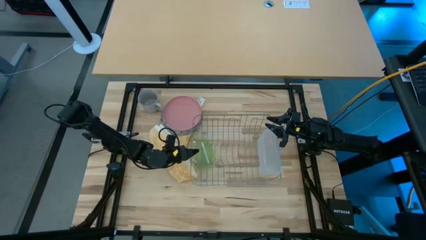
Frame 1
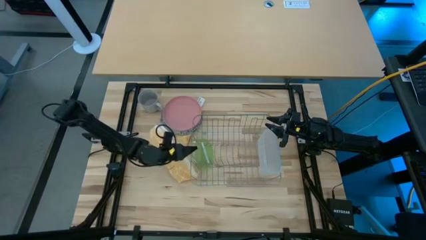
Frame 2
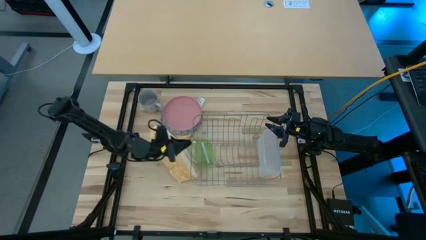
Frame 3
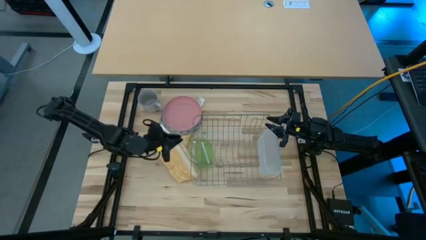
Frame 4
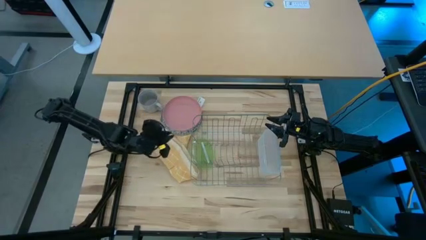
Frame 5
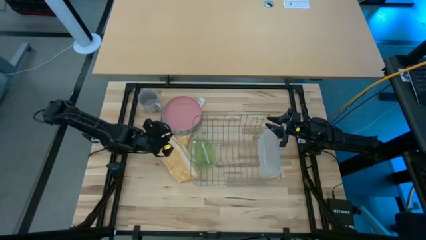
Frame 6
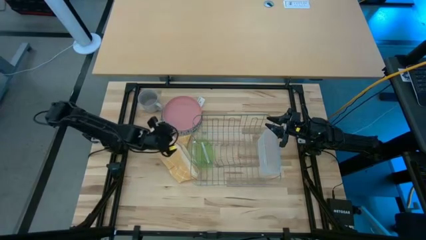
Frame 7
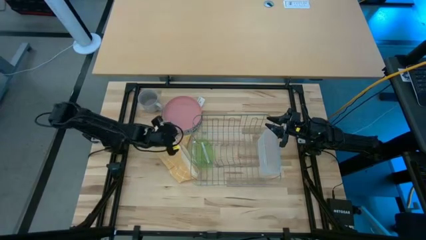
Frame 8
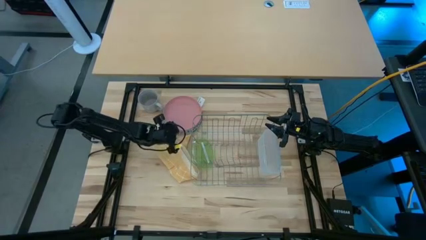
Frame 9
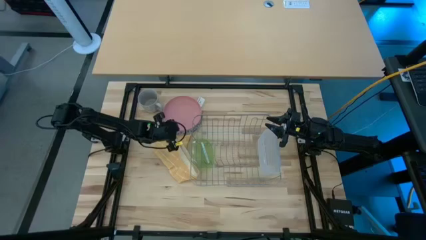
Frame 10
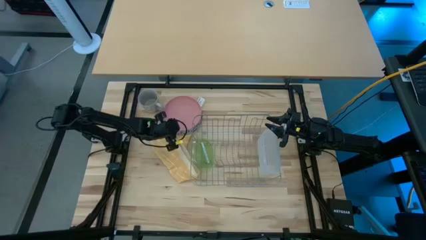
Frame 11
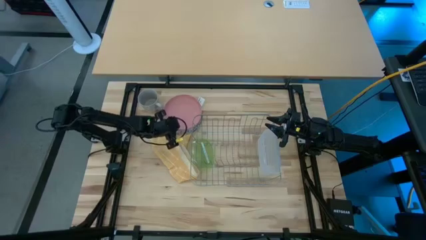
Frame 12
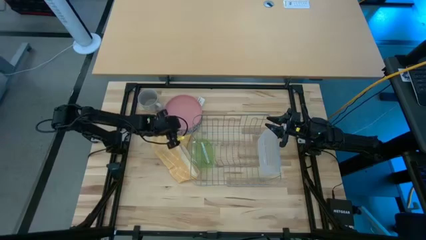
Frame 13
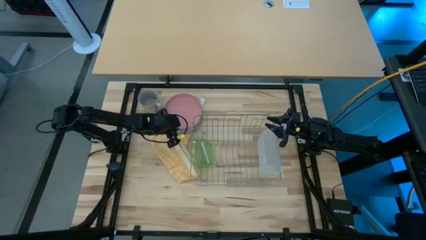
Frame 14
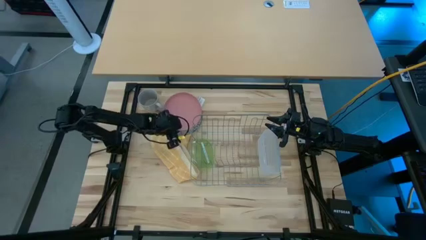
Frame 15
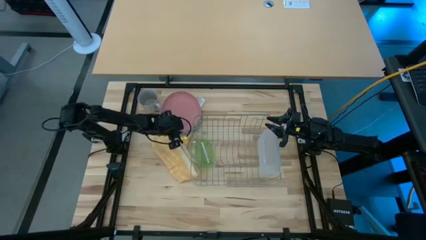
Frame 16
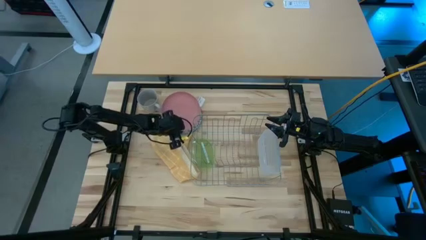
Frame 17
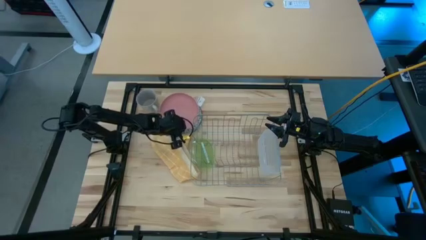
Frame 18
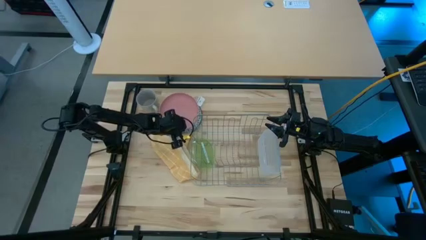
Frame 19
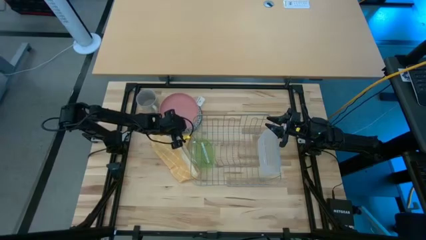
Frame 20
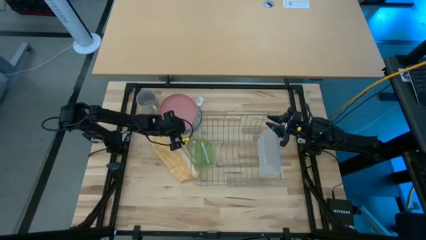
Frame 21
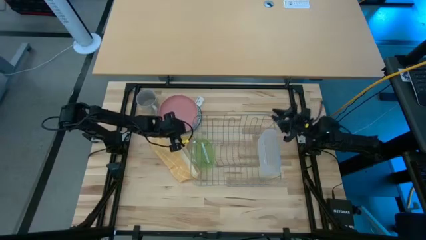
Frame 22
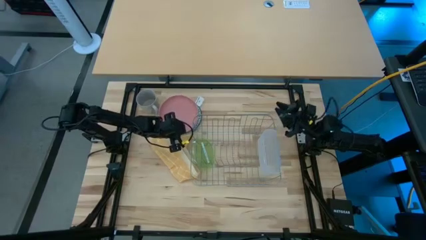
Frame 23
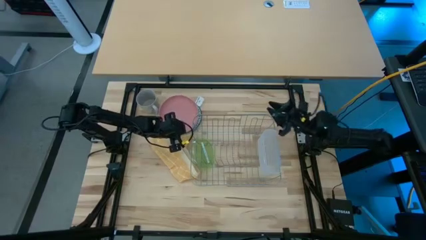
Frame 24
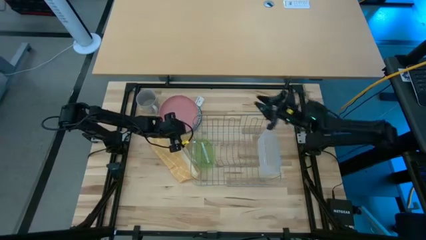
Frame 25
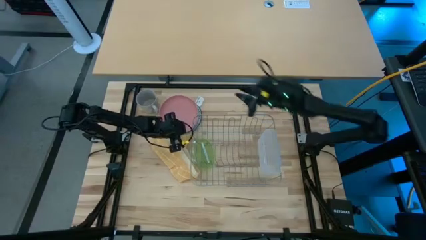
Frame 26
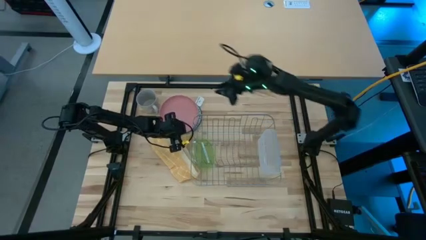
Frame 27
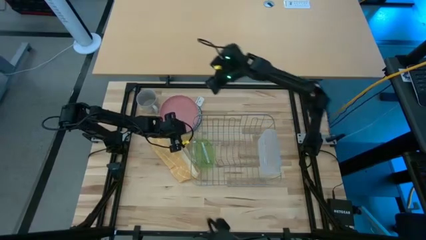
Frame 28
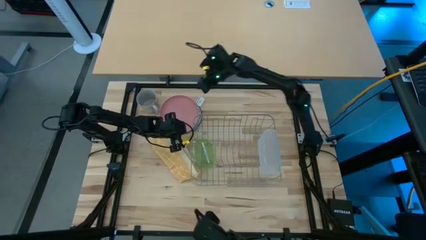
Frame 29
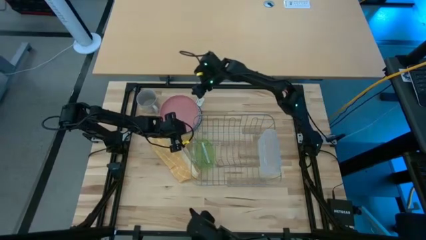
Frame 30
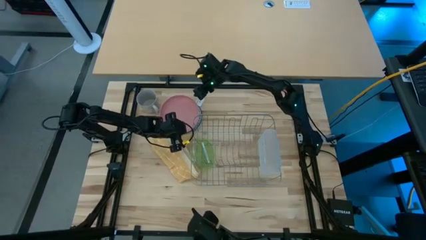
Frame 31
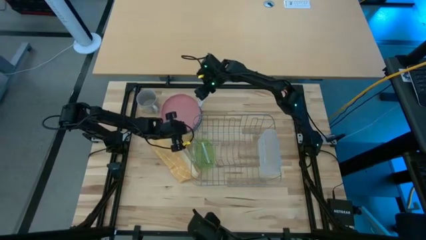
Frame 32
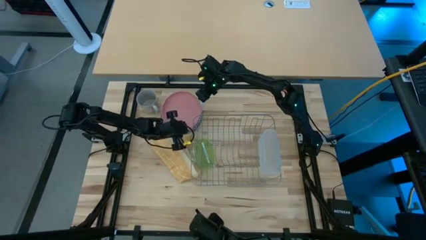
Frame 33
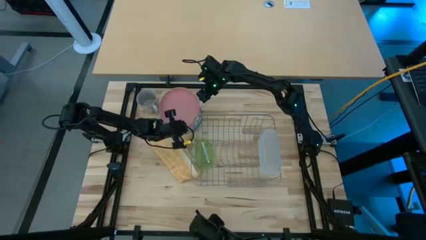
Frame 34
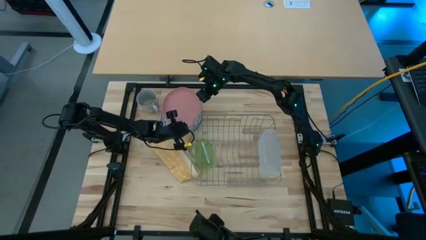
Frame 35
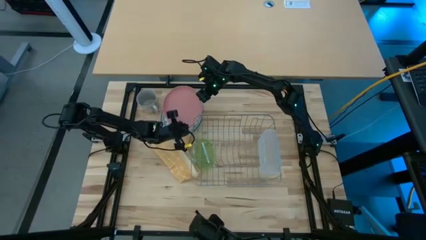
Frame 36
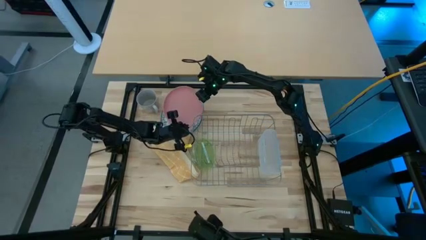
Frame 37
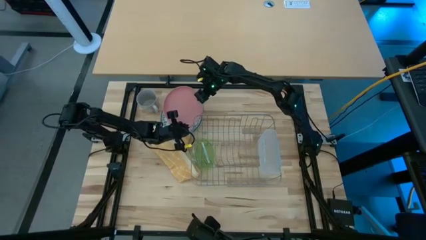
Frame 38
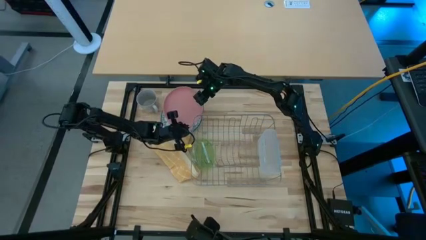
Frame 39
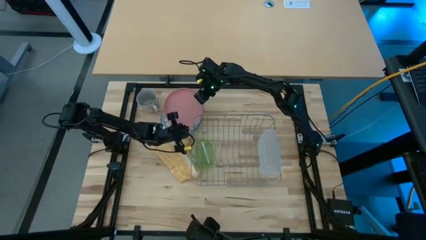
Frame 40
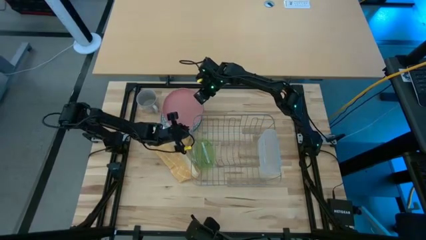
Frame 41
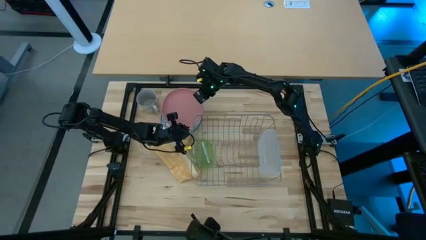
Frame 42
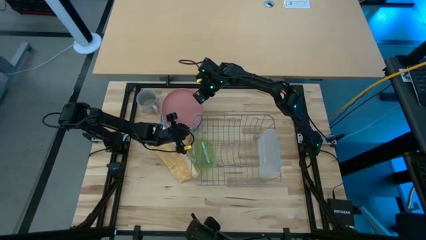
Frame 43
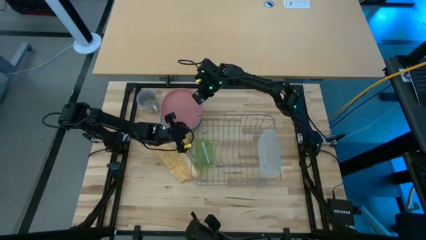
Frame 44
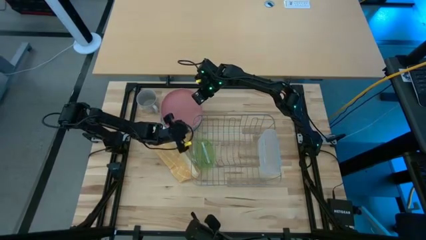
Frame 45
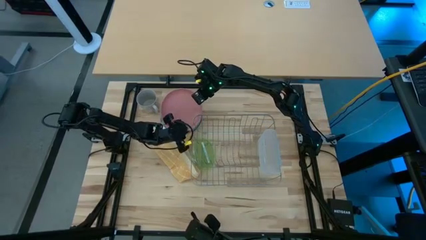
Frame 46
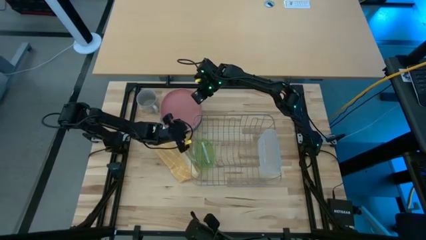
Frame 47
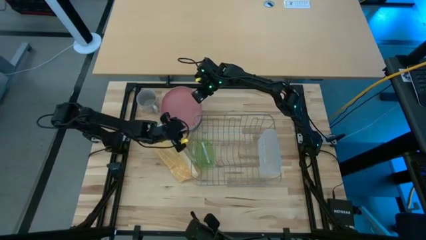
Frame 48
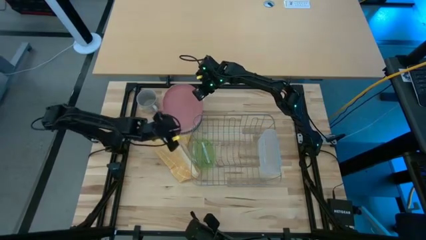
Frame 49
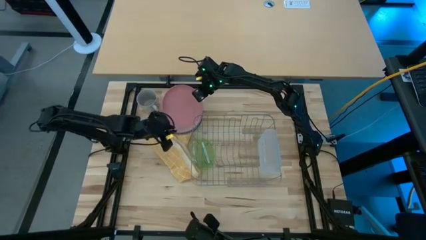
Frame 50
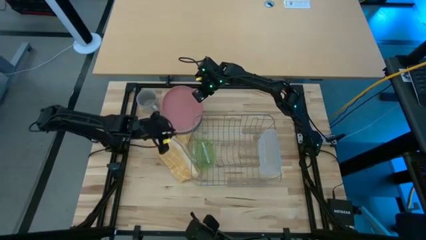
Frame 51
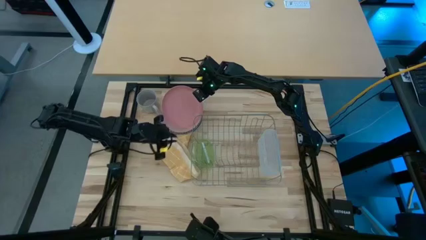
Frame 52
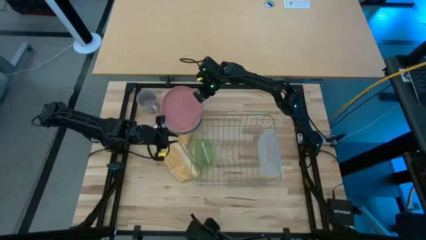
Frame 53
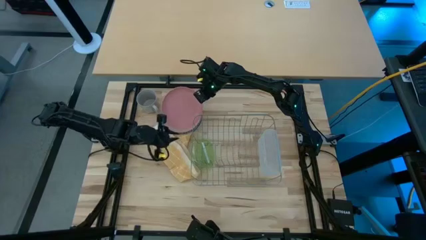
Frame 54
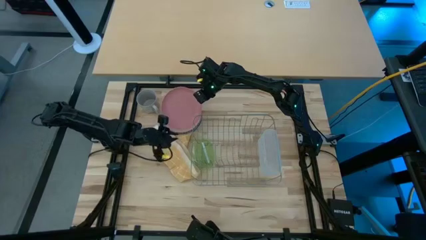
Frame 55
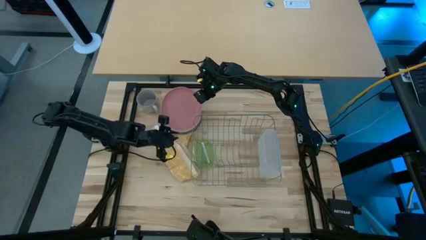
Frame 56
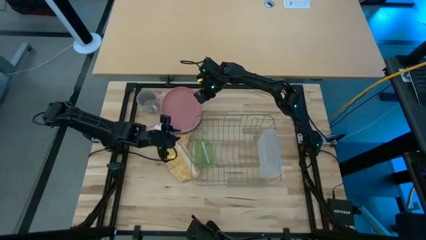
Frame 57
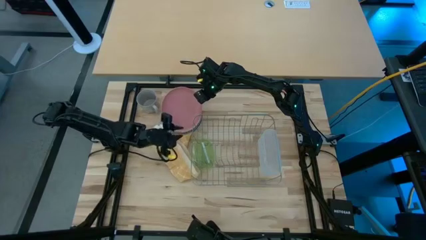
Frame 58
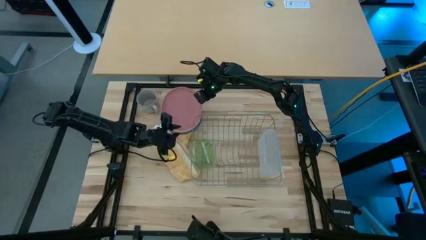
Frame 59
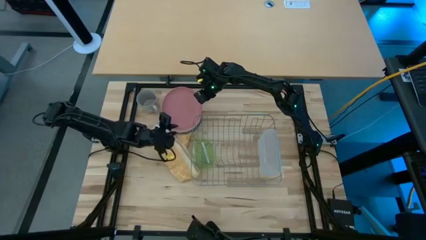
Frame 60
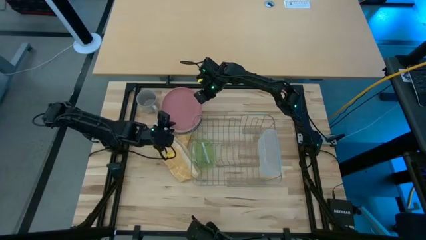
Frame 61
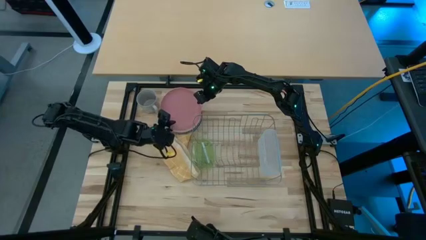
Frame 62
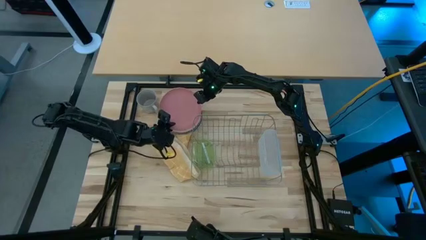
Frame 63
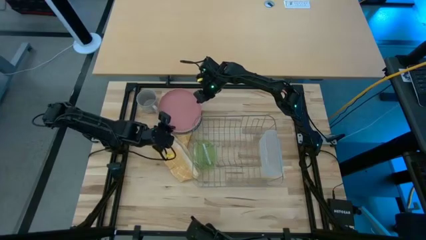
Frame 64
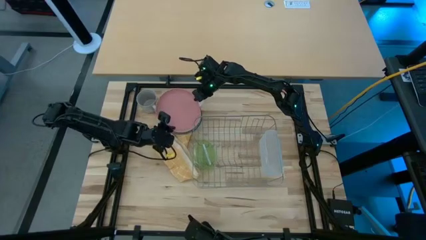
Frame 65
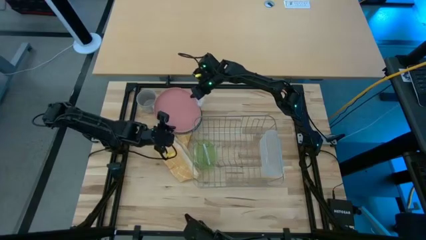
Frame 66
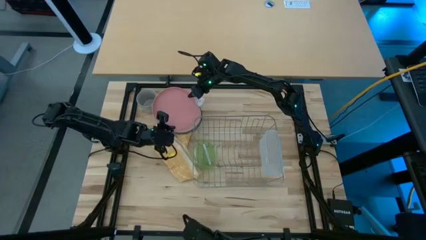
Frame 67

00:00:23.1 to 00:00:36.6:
Task: Sort dishes
Put the pink plate in the dish rack

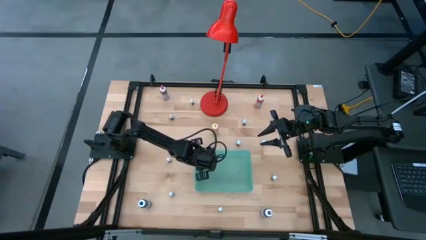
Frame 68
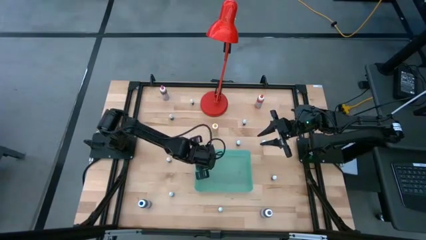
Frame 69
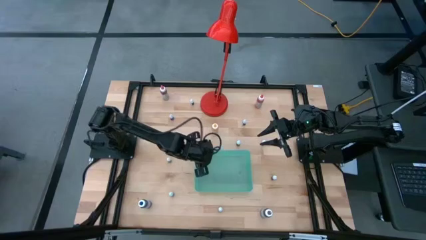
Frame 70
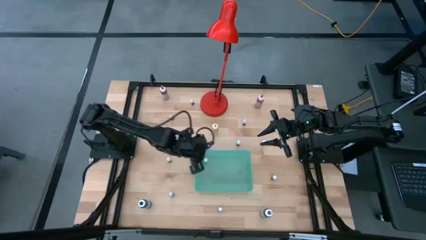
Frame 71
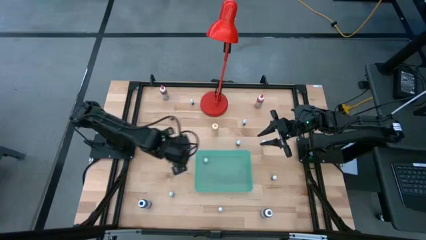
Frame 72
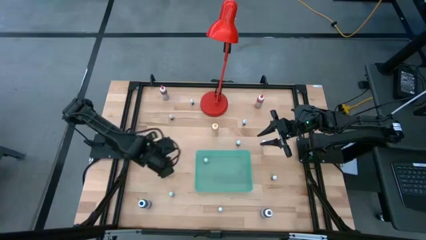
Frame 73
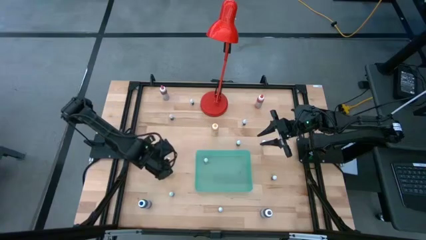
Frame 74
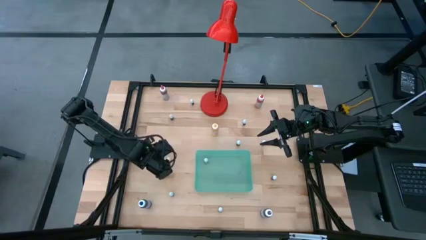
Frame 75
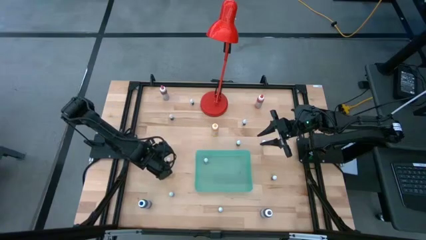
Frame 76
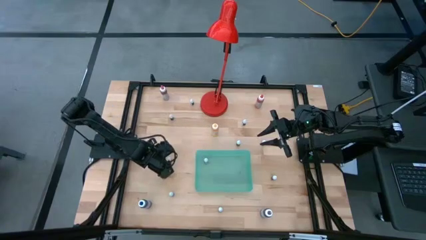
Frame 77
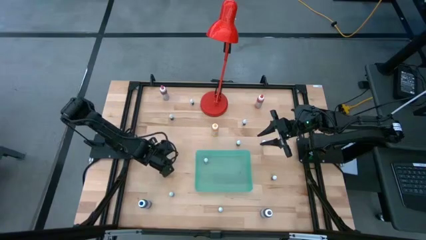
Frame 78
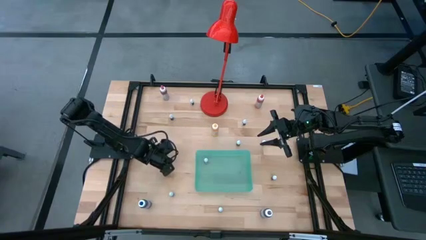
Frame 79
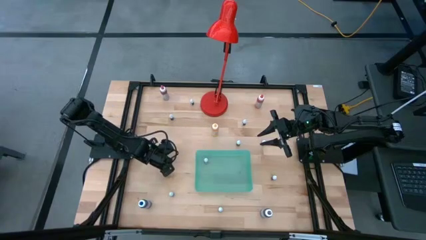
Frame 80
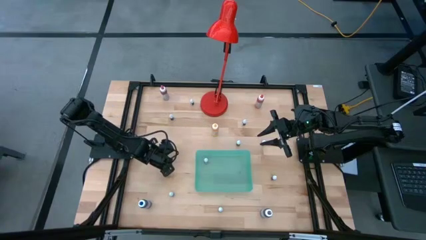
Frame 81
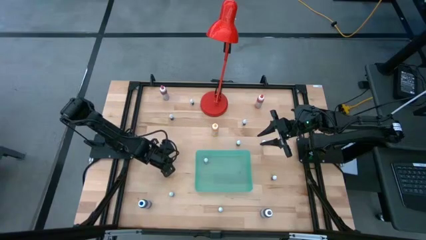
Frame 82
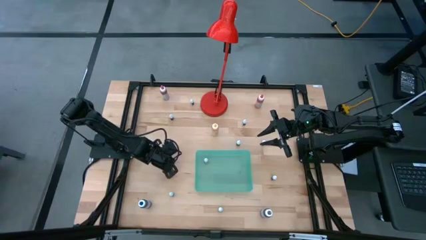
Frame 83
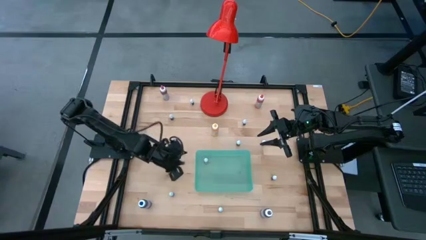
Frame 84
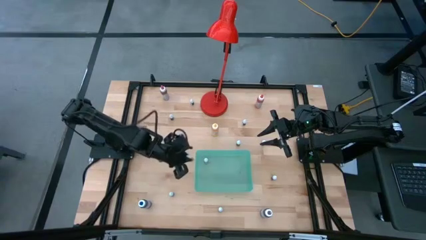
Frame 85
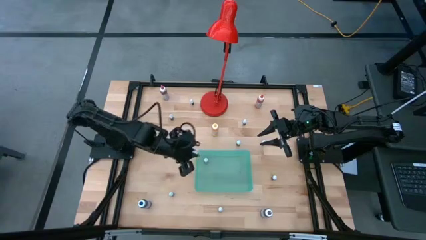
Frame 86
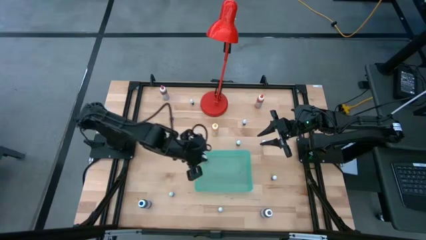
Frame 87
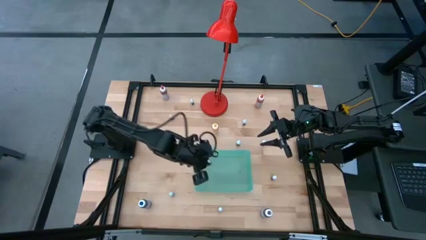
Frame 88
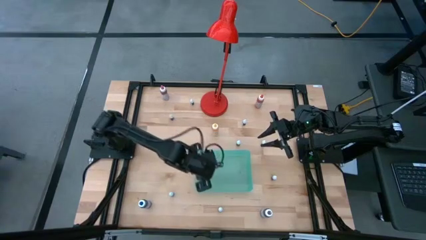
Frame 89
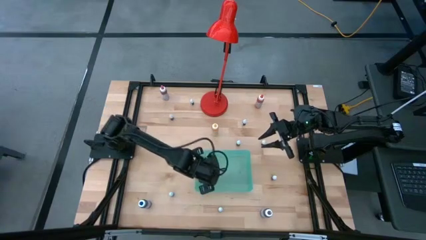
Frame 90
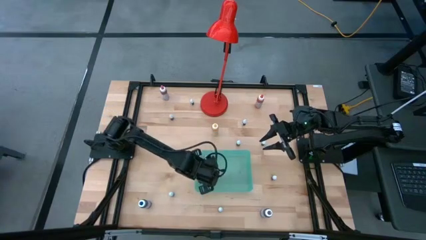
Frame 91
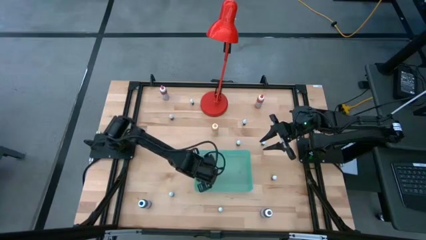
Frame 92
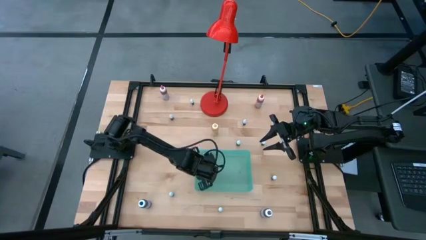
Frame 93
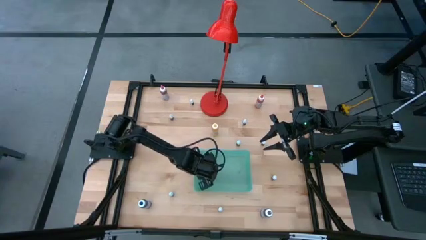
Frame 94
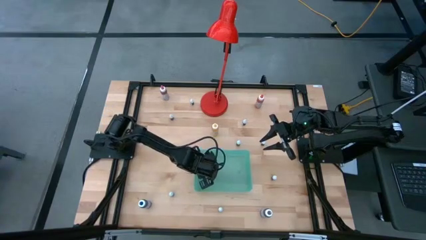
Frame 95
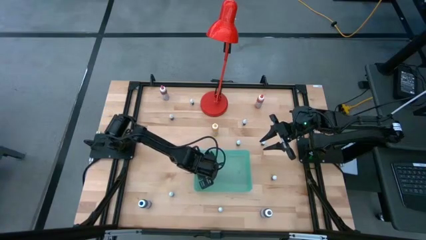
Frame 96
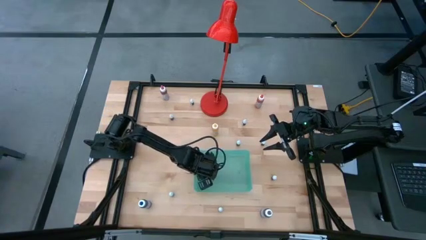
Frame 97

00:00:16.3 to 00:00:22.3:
Task: Pick & Place food coloring
Put the small green food coloring bottle into the blue bin
